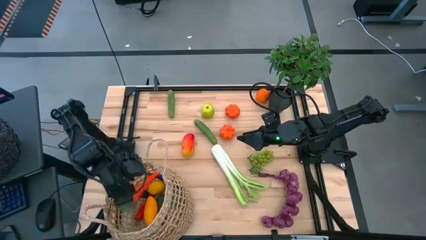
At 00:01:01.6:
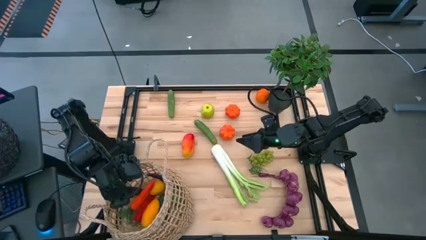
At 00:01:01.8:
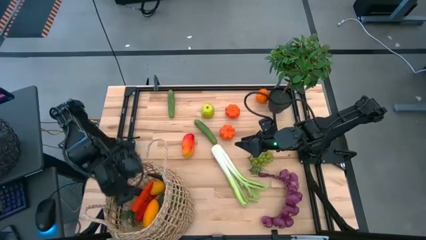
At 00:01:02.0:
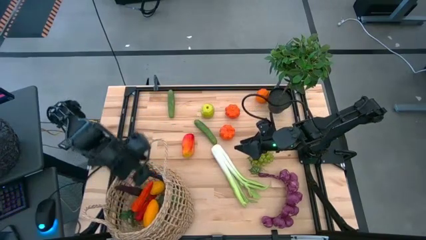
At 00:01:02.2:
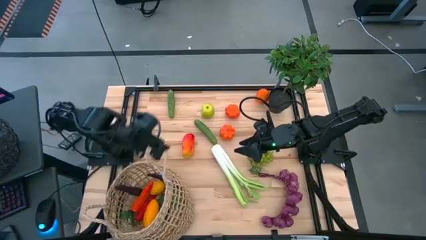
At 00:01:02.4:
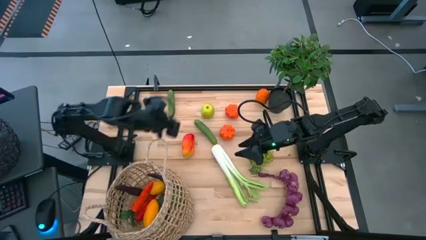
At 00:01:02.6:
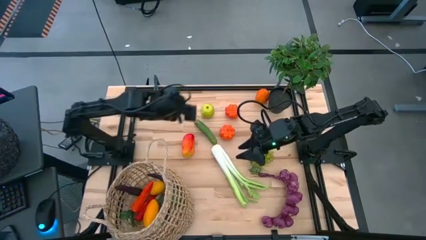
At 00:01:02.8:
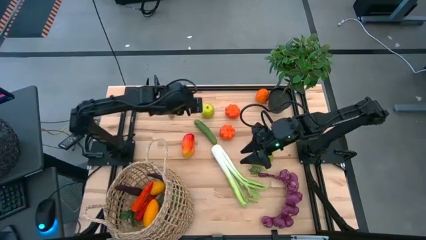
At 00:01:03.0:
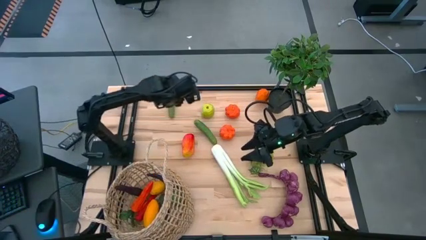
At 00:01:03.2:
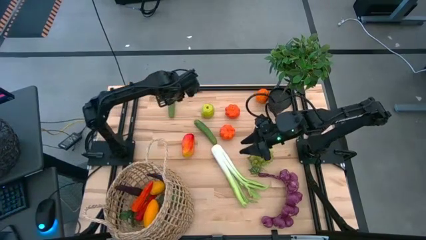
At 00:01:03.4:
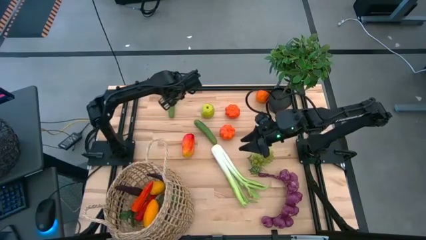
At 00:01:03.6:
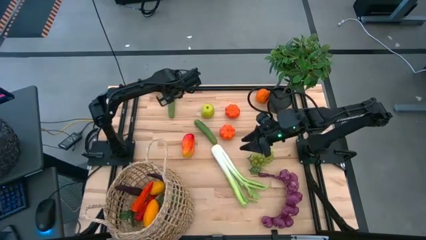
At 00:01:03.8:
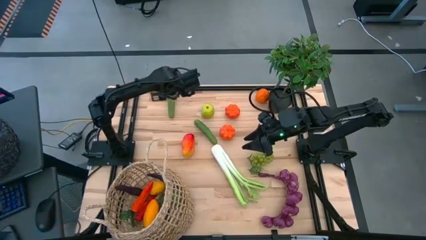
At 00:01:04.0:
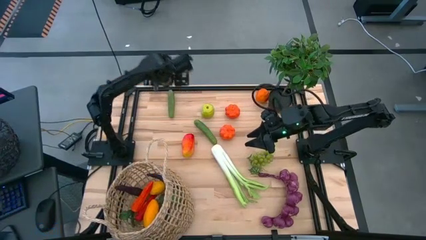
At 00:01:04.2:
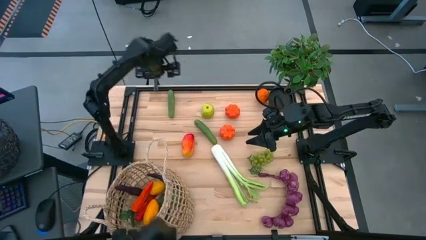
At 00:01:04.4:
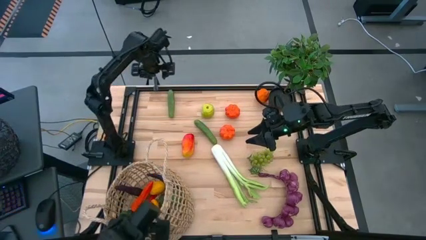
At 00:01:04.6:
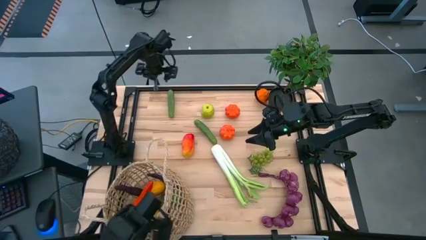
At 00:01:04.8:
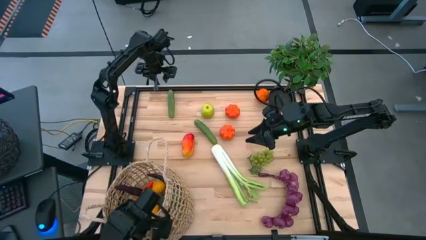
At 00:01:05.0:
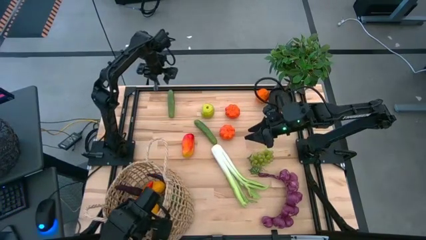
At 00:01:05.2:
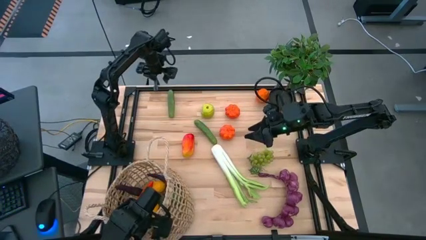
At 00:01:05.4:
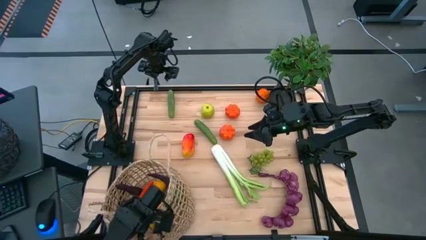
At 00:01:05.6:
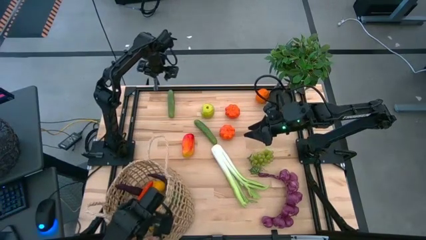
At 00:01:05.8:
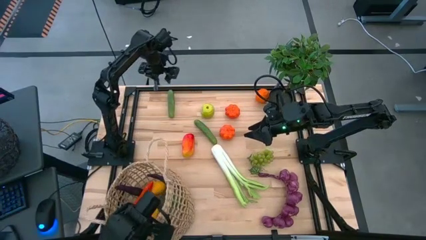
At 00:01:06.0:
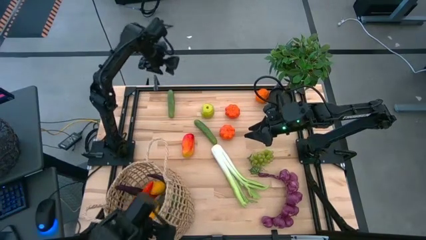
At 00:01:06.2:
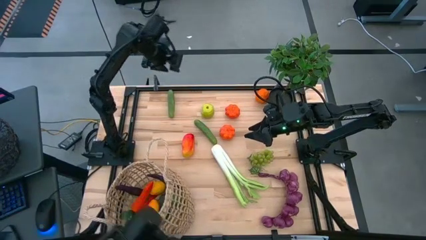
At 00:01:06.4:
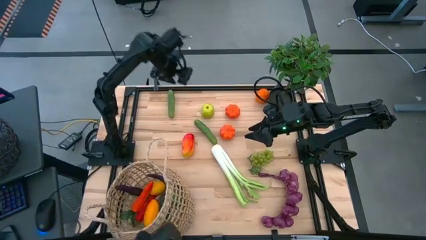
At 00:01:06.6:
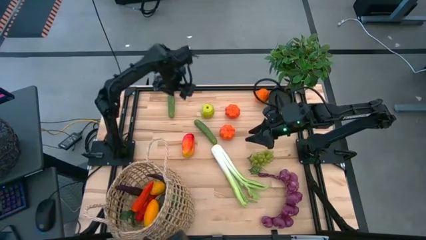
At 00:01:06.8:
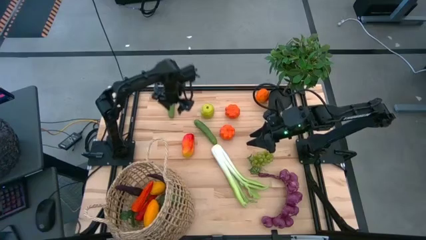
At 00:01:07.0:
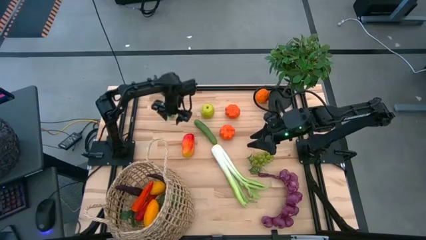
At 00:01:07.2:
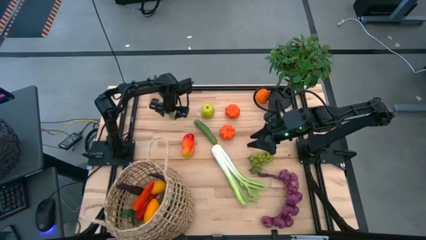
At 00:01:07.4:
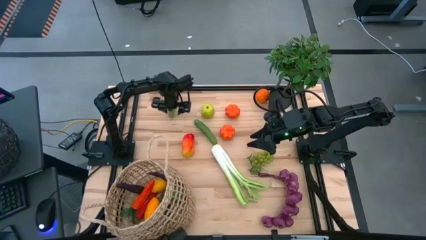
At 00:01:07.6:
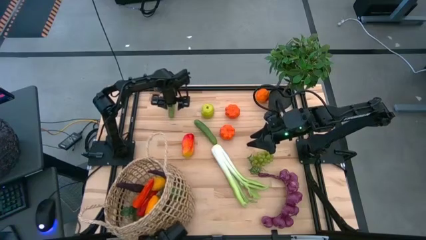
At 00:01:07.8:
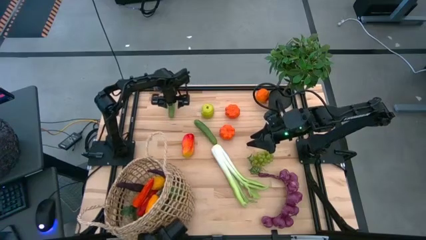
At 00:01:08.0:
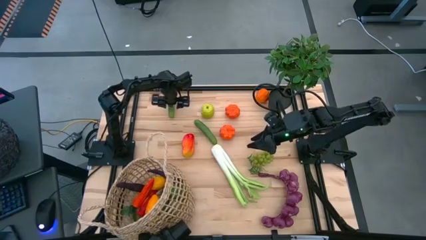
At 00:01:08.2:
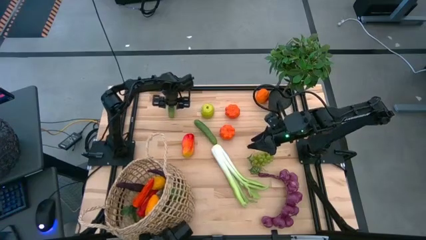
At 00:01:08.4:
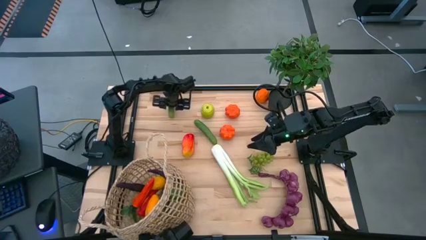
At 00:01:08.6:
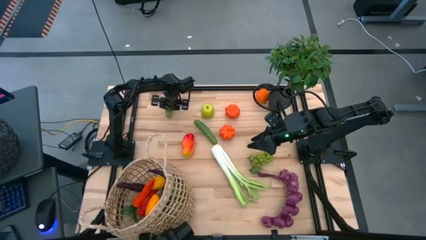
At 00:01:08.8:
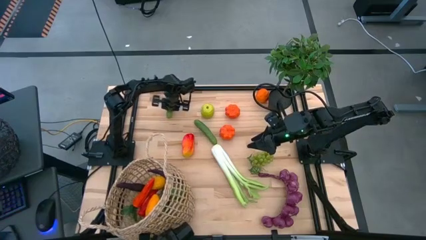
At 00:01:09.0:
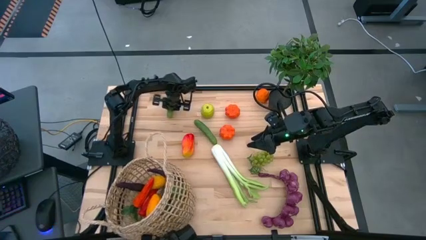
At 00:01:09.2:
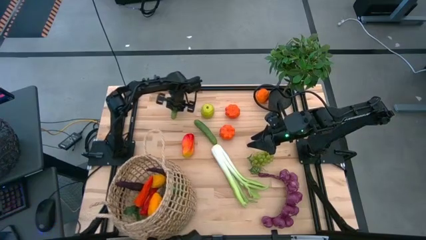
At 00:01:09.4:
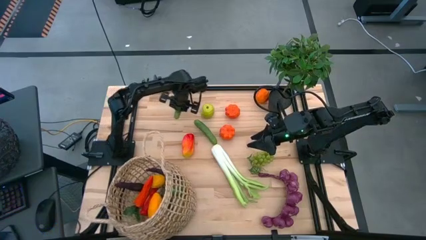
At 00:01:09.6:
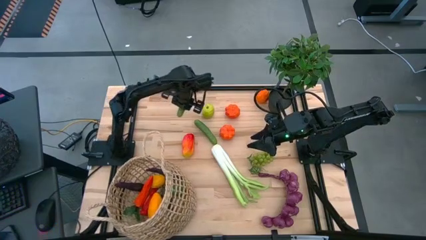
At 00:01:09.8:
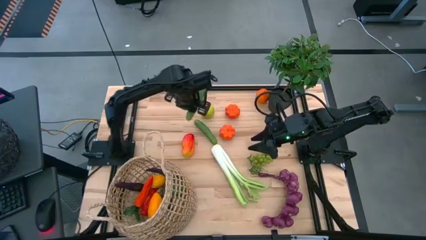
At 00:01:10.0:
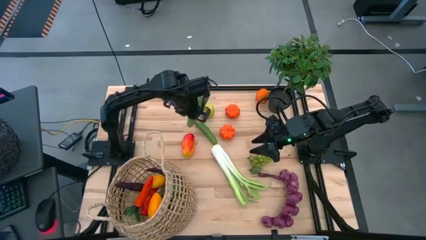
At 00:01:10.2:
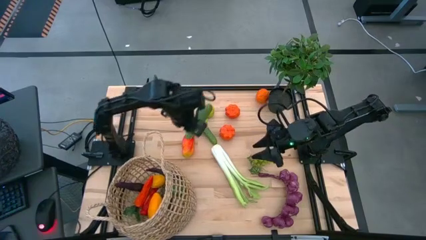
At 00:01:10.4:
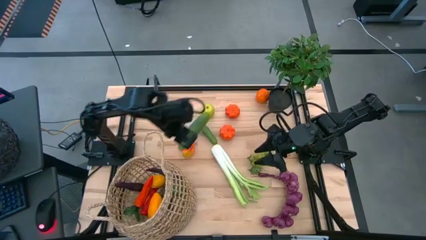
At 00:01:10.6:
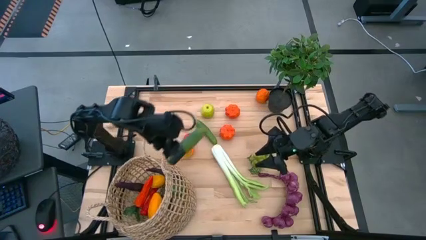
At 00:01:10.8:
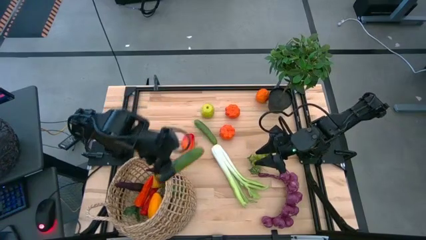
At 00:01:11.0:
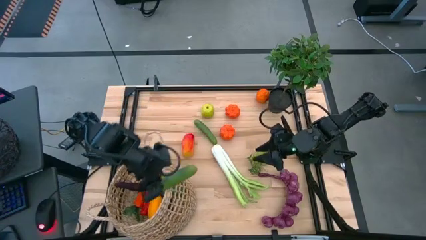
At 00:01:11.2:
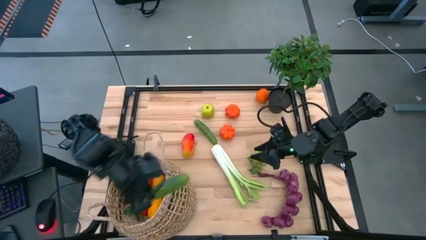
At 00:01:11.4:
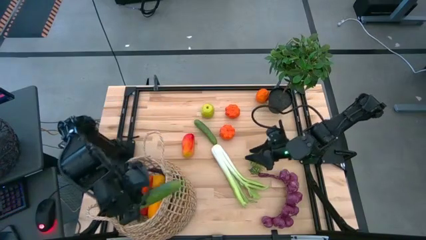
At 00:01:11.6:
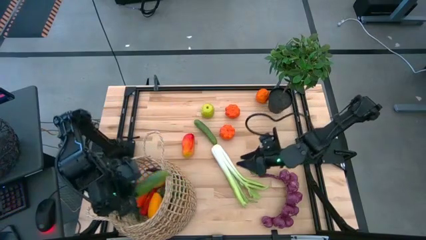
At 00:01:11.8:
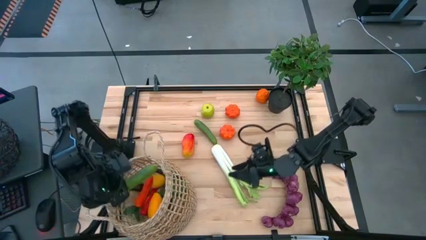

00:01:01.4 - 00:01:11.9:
Task: Build produce basket
Put the top cucumber into the basket

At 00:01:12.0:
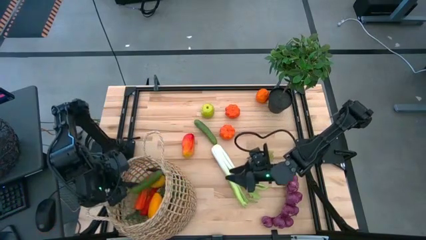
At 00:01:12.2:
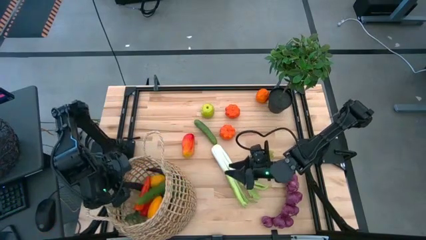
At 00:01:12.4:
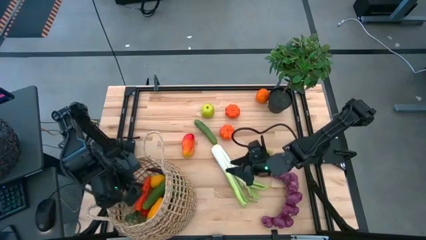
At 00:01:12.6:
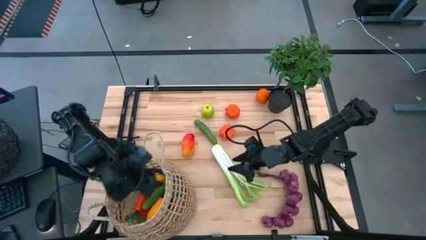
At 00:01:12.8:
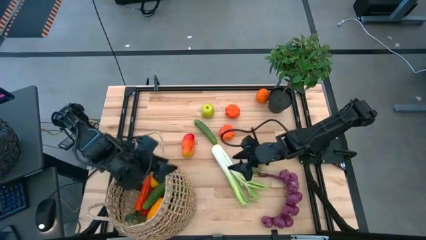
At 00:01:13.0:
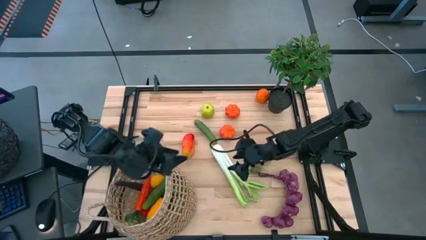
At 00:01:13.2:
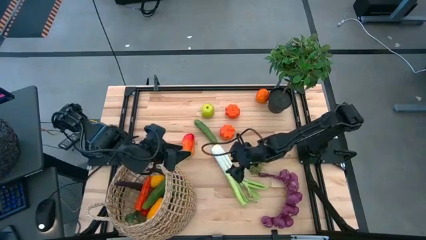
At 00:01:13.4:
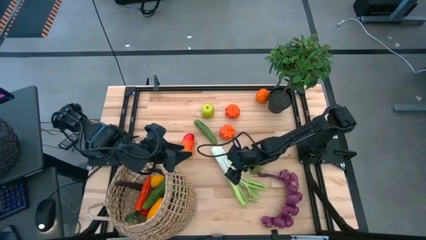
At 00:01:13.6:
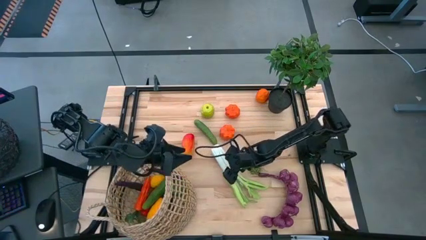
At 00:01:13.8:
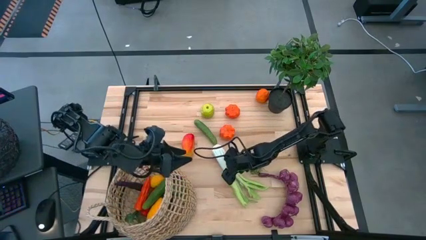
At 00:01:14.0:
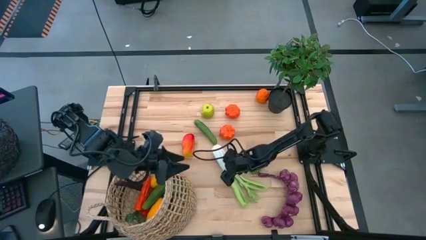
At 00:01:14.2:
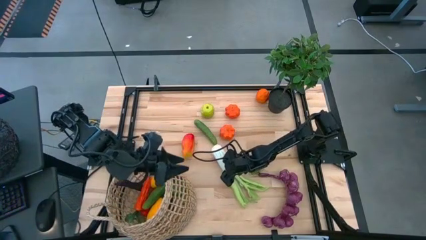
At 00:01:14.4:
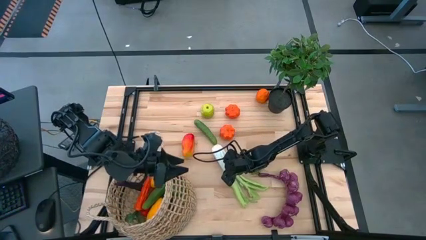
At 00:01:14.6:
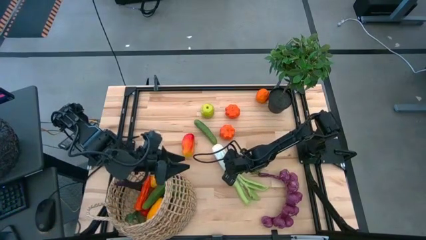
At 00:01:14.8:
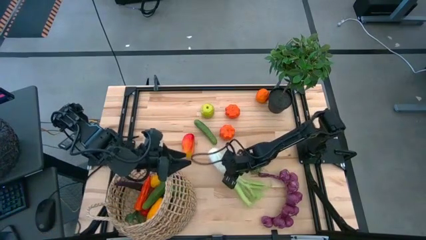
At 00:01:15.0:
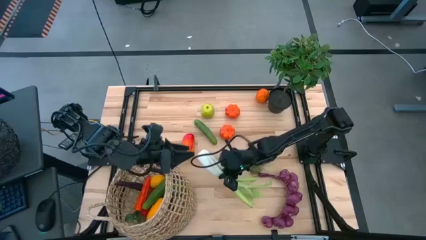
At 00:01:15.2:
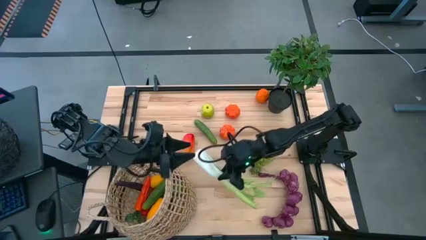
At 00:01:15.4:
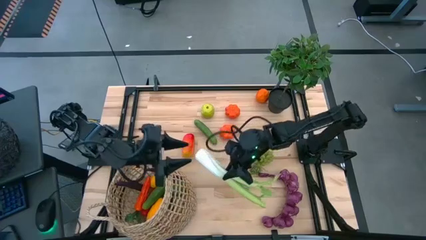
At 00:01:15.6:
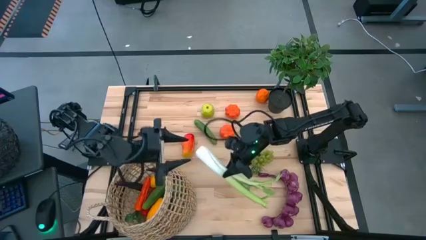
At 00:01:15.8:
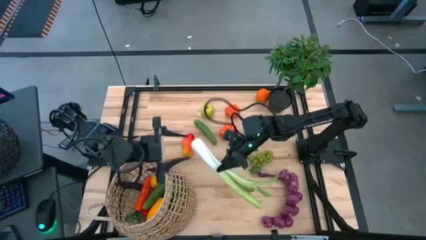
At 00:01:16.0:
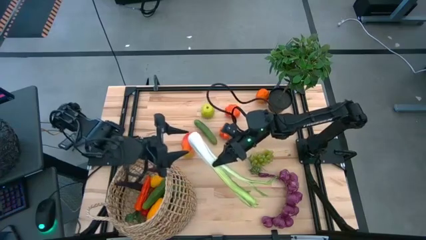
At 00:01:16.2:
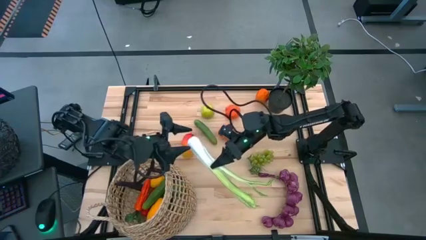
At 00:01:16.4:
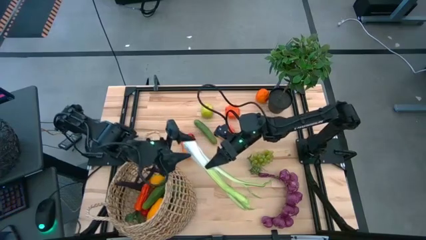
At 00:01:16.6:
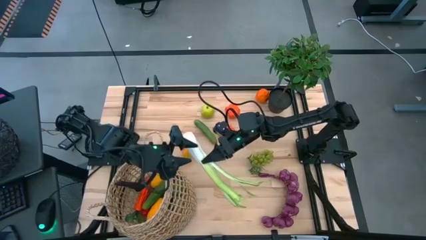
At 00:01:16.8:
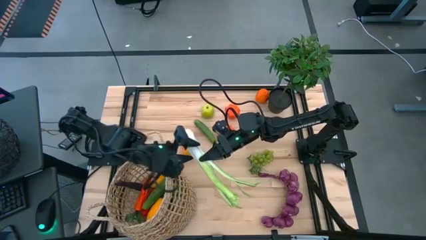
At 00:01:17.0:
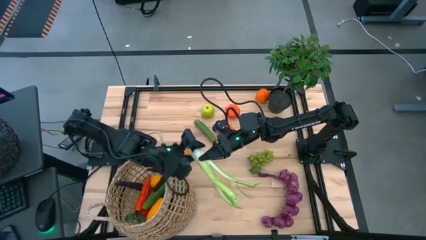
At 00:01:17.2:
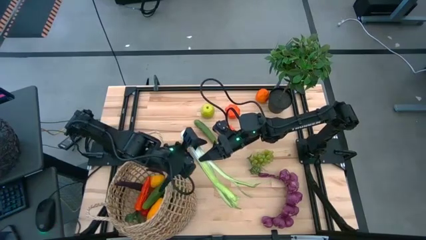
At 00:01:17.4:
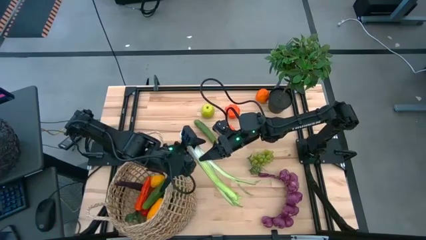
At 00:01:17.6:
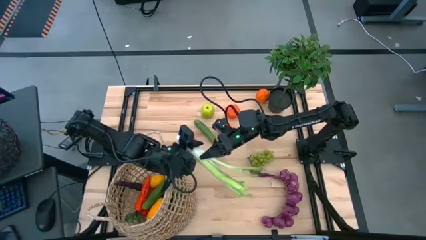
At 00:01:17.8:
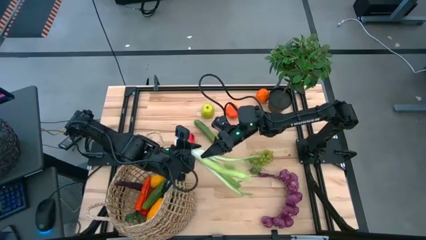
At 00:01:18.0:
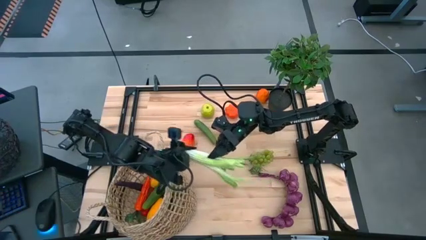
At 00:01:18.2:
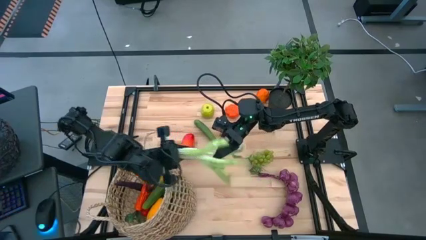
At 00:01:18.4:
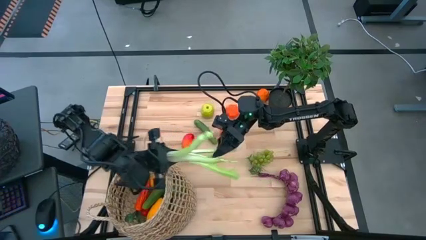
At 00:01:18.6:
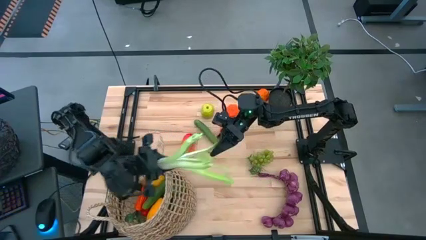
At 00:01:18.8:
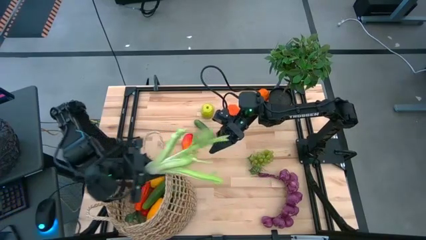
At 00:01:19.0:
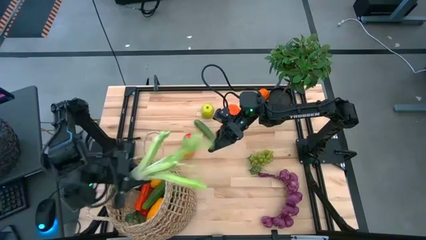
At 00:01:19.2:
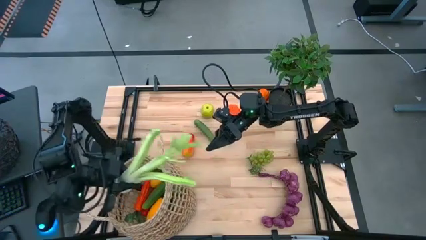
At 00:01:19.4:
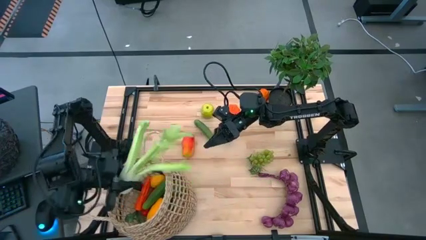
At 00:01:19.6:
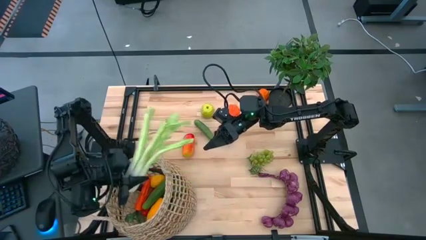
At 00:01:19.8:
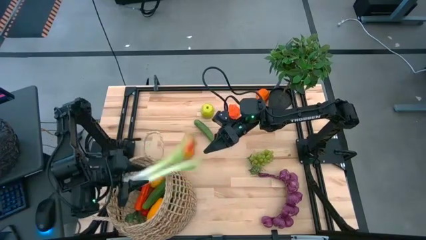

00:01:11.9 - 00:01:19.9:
Put the celery into the basket
